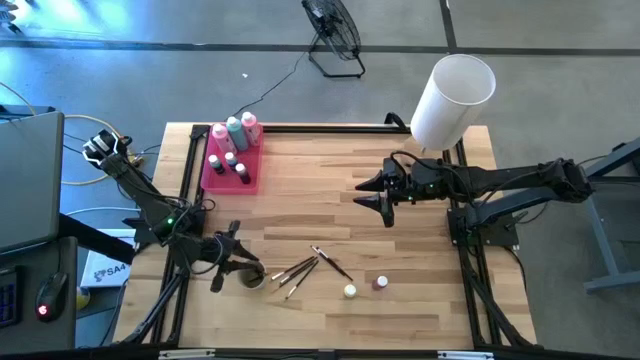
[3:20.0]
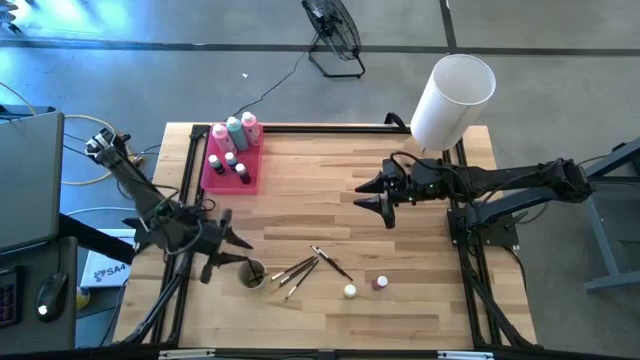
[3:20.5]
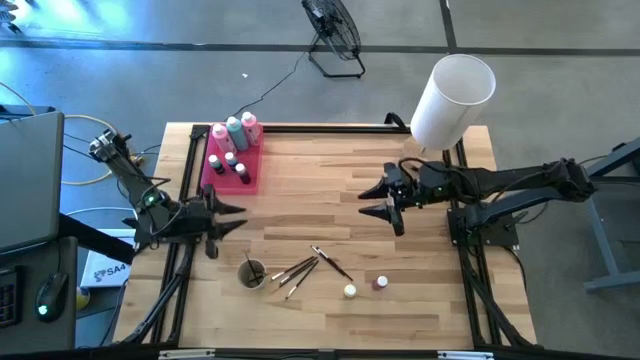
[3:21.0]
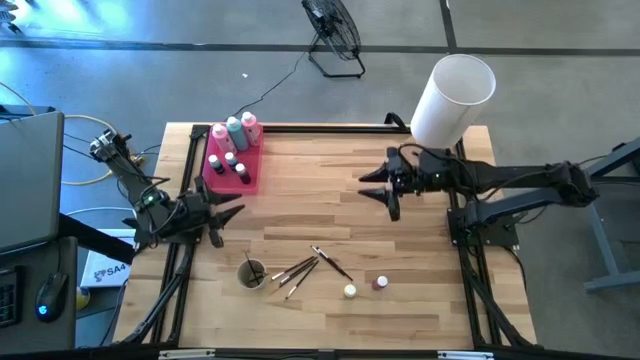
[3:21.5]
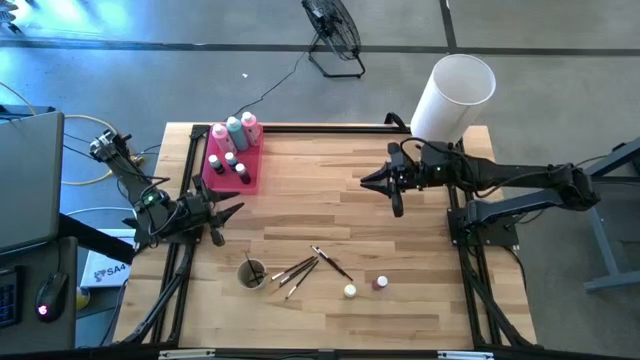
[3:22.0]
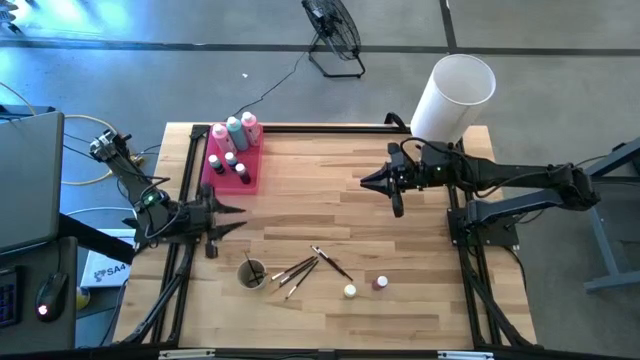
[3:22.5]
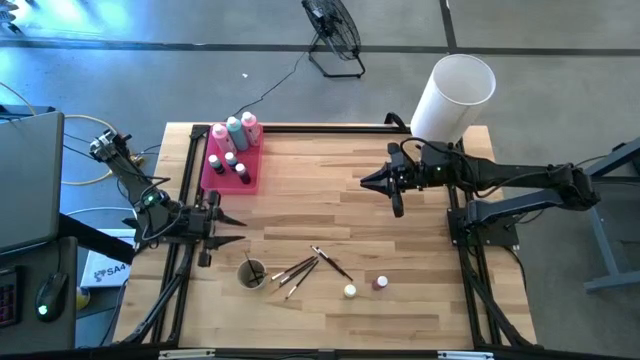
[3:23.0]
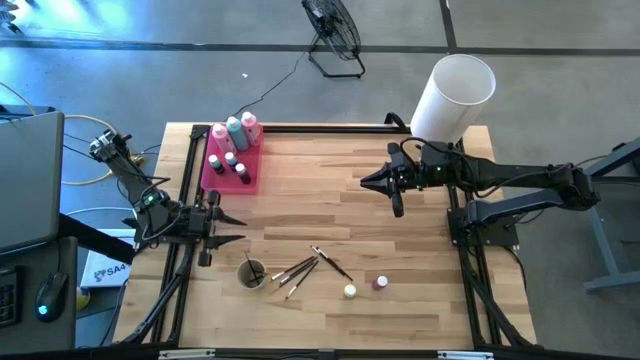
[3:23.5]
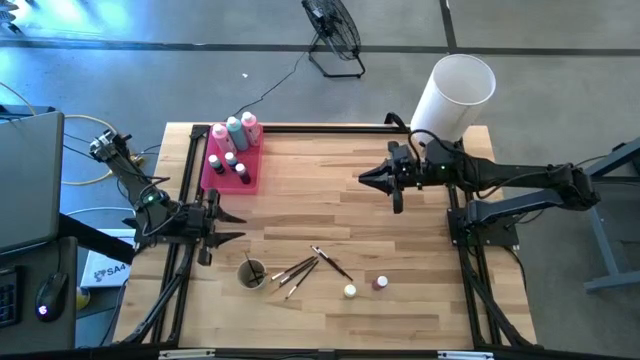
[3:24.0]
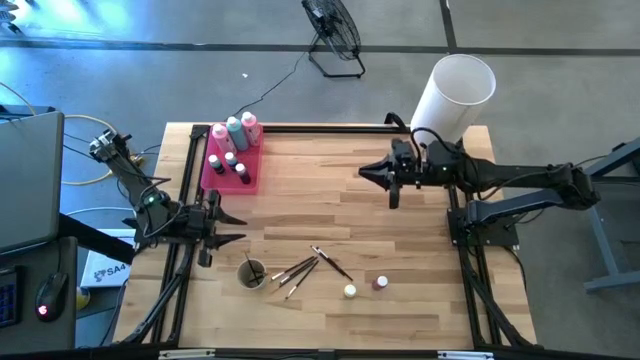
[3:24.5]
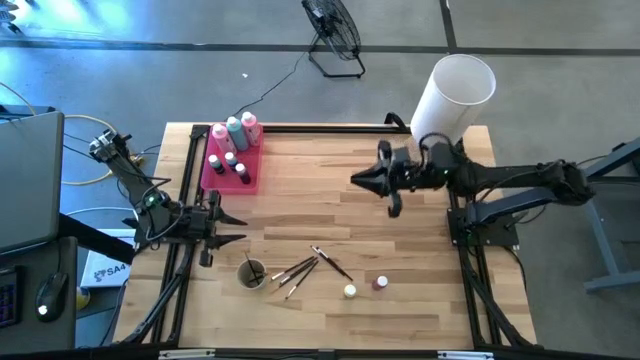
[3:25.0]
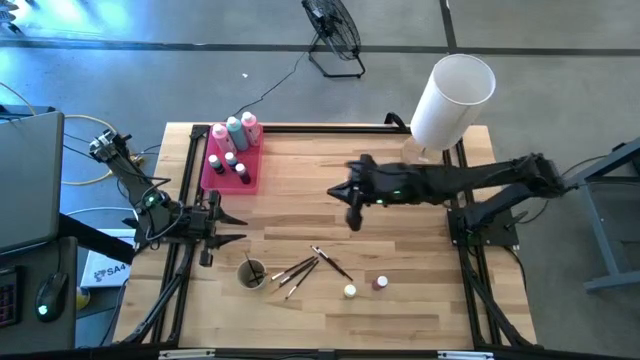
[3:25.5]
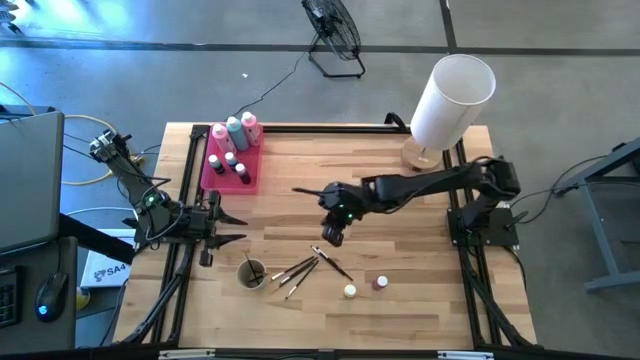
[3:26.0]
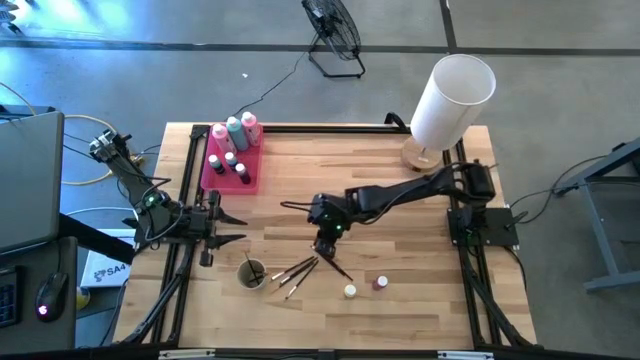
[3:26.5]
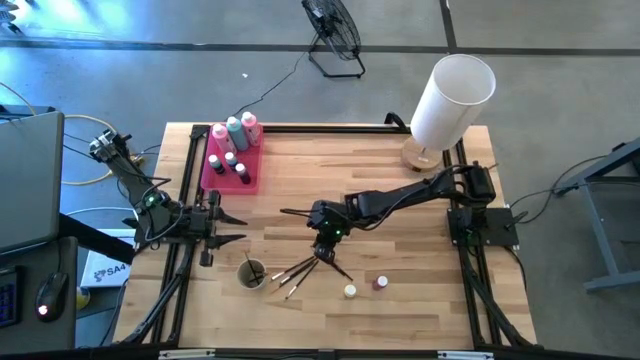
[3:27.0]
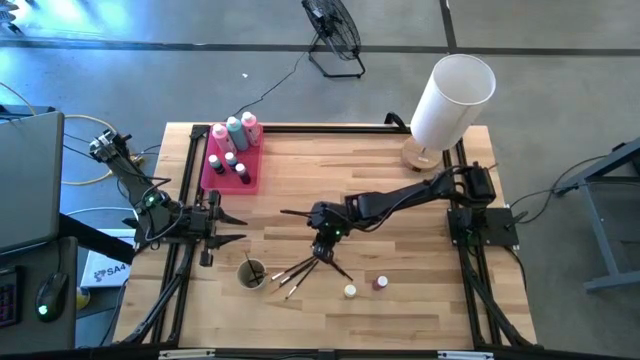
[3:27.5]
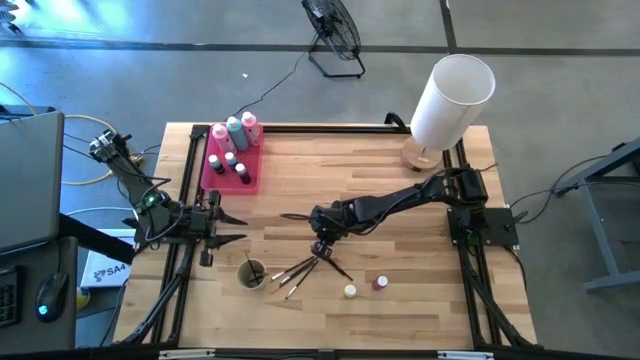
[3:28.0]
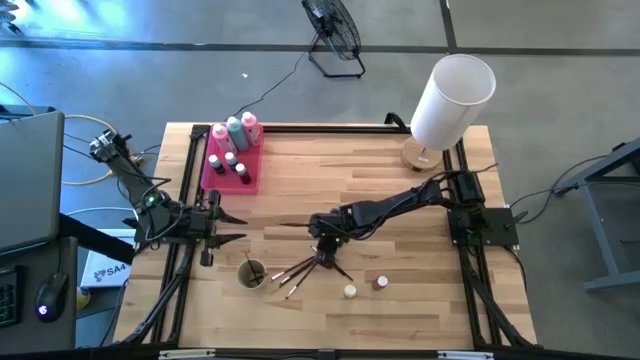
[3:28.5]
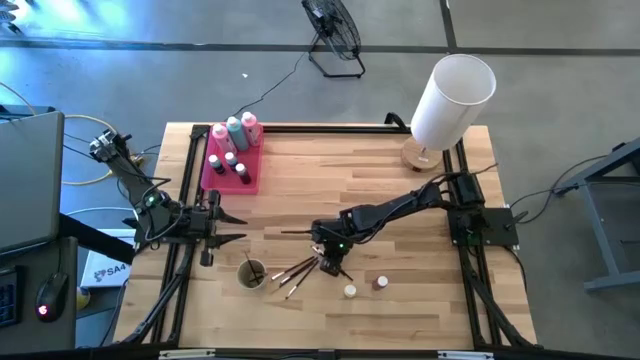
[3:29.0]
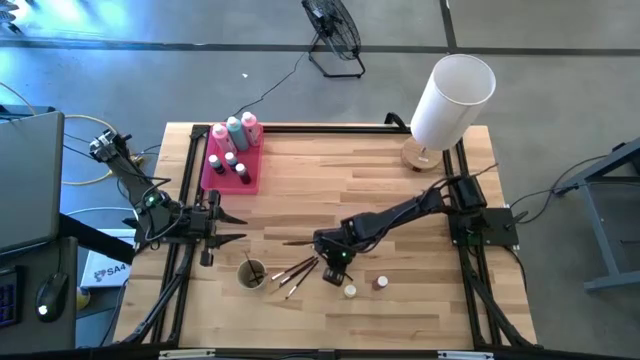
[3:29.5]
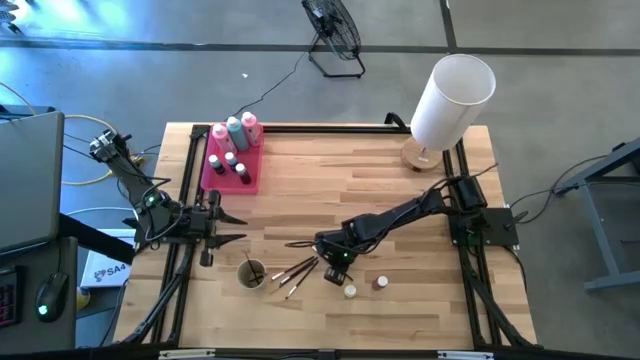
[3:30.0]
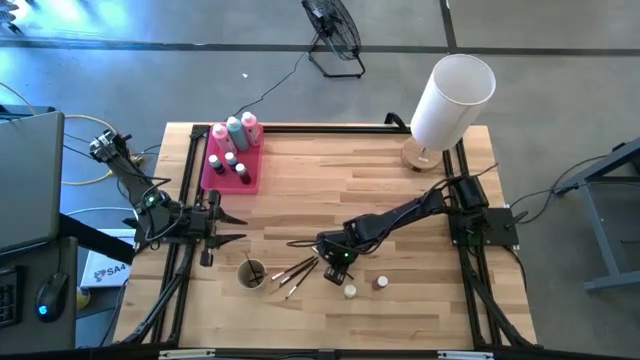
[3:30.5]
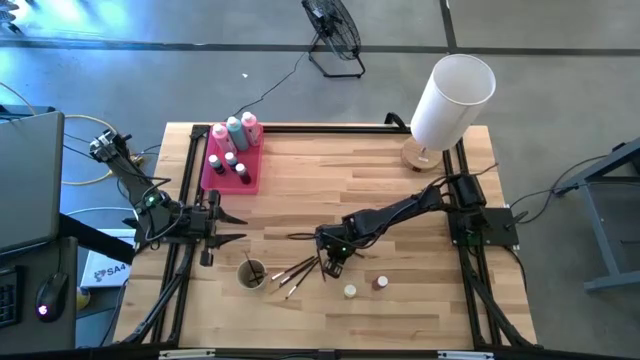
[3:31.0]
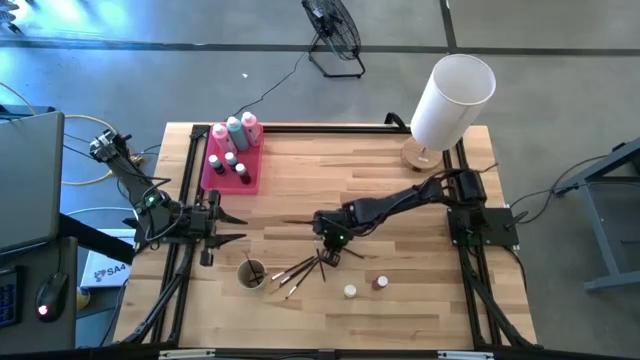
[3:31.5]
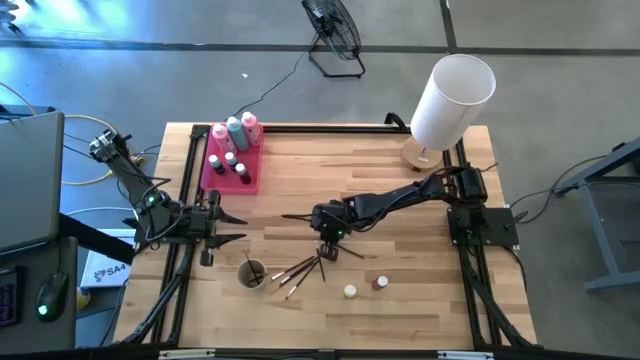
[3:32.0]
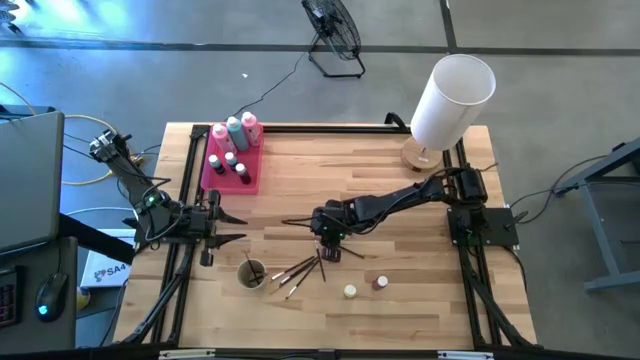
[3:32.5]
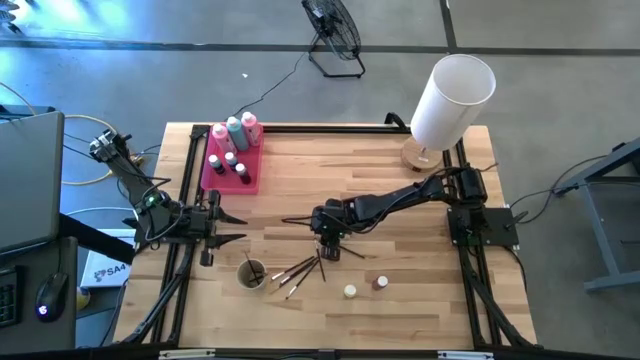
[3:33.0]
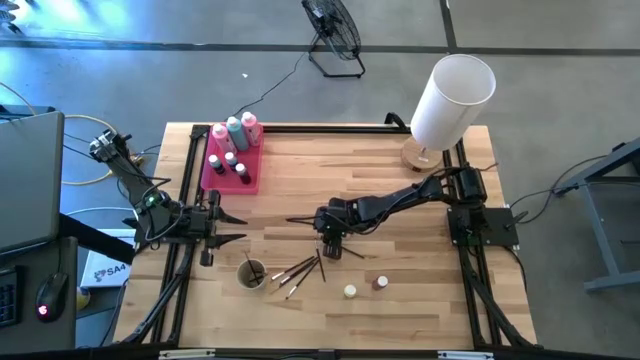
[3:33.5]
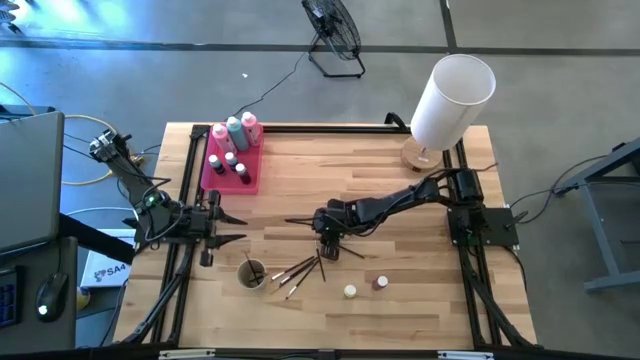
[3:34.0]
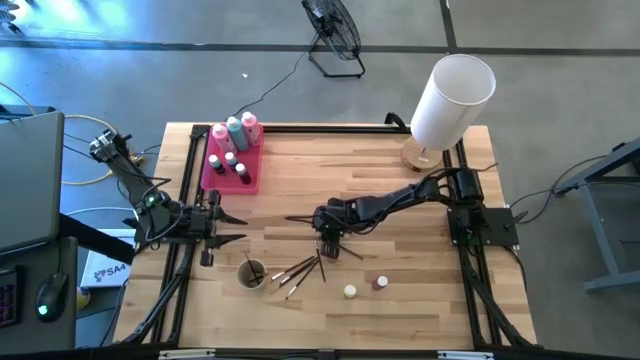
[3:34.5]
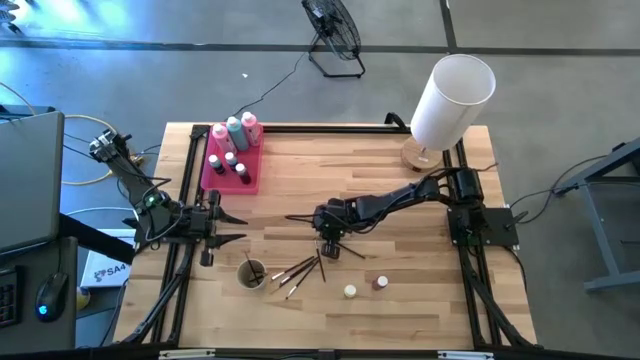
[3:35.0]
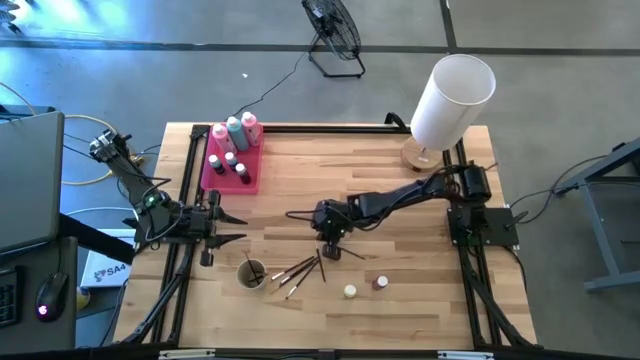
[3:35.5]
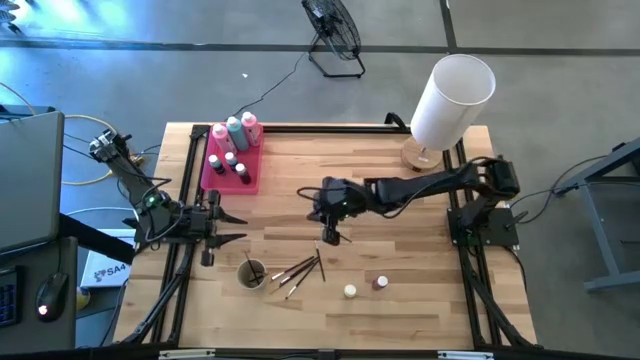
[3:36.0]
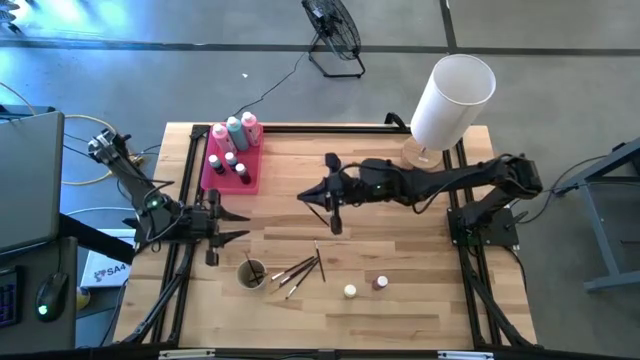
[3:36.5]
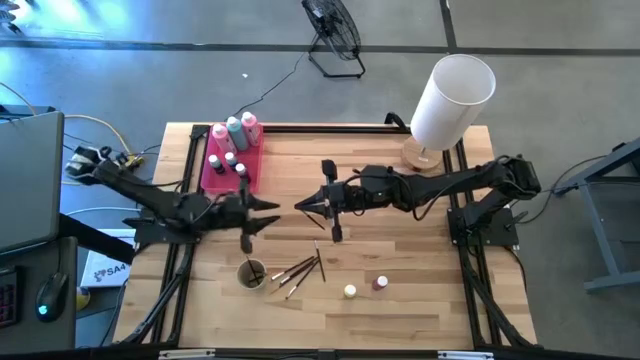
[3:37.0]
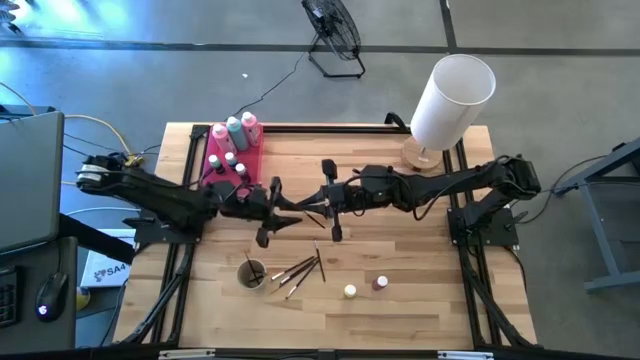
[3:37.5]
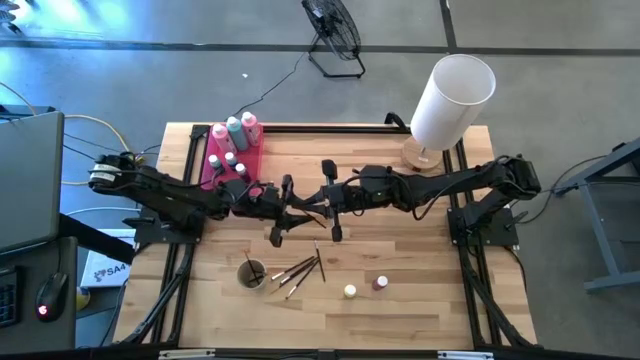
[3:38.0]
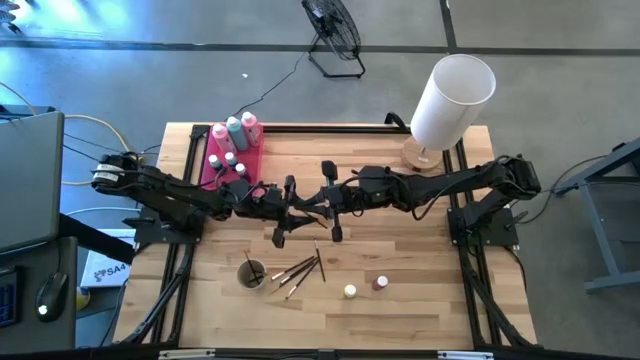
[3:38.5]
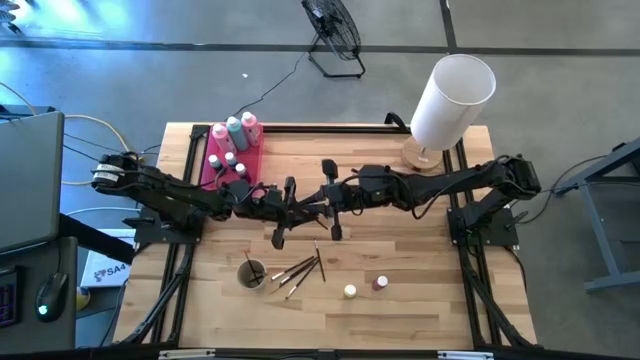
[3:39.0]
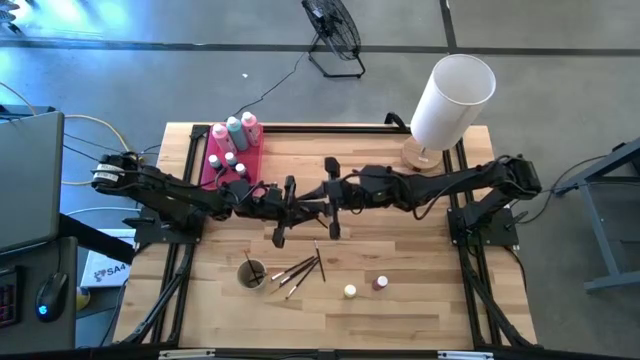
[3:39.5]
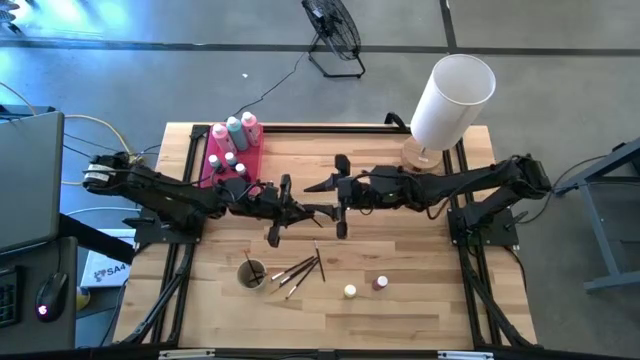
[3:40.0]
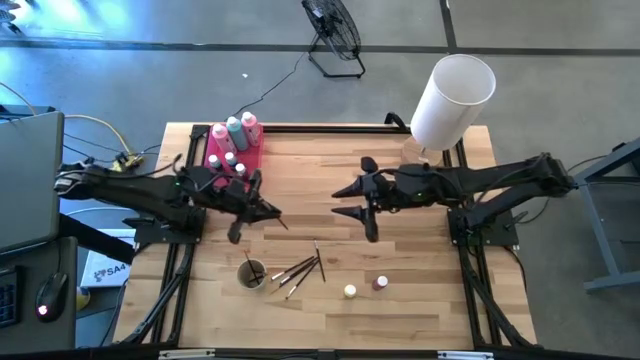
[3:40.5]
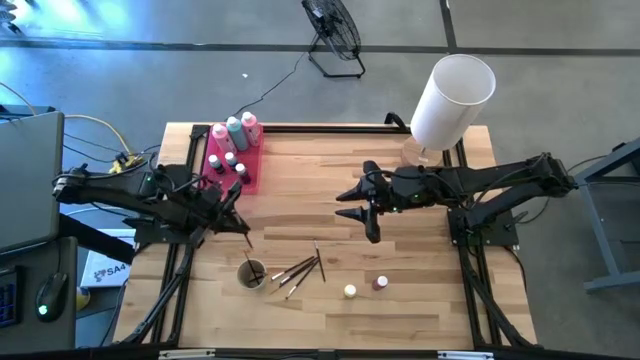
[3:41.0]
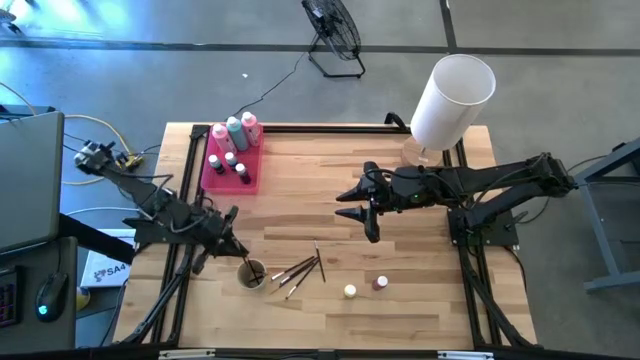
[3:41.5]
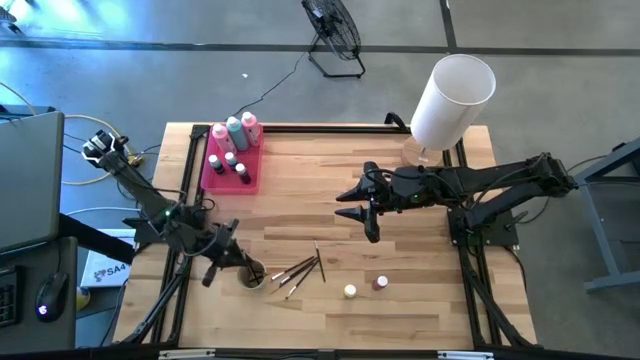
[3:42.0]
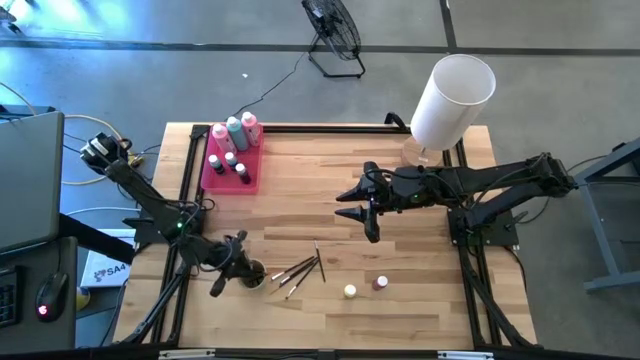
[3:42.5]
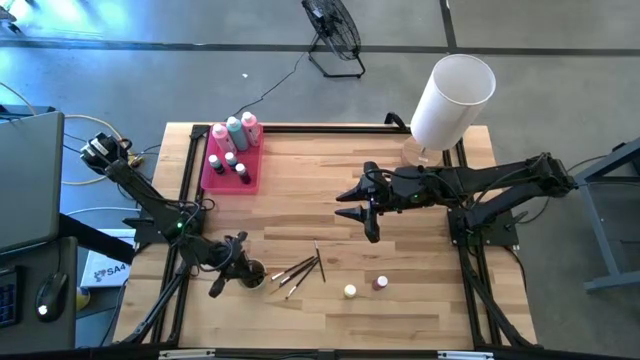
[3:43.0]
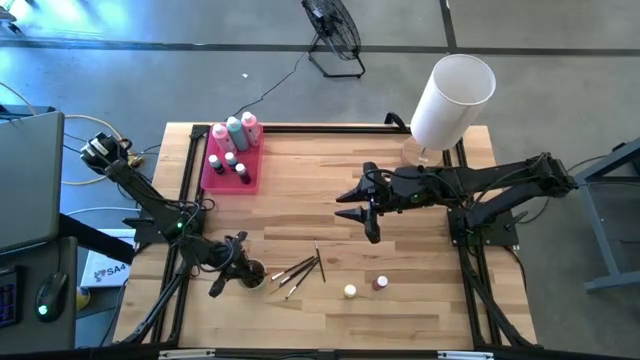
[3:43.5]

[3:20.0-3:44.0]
Task: Pick & Place Paint Supplies
Put the silver paintbrush into the light brown cup
